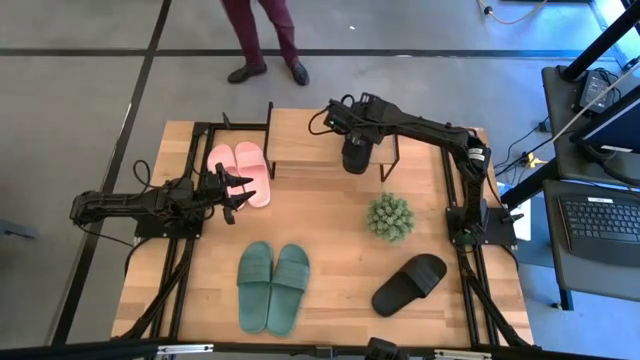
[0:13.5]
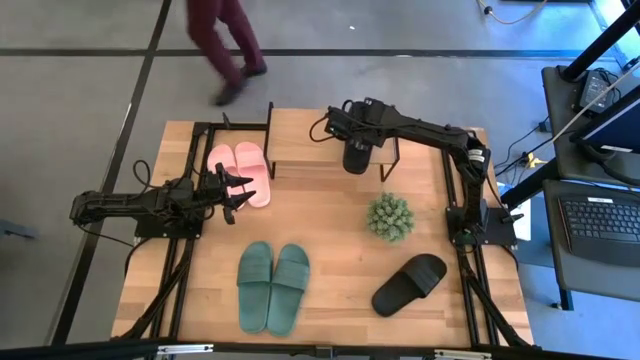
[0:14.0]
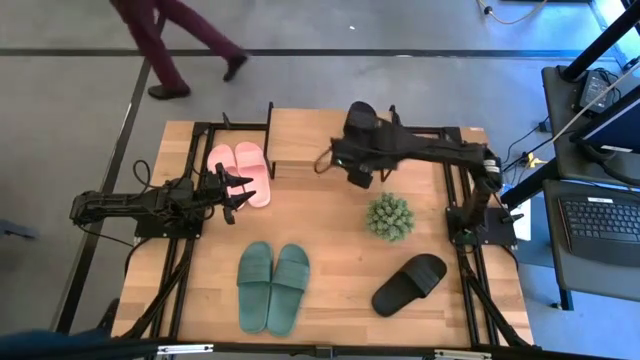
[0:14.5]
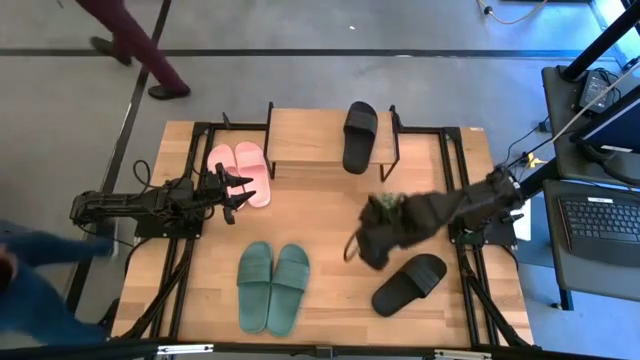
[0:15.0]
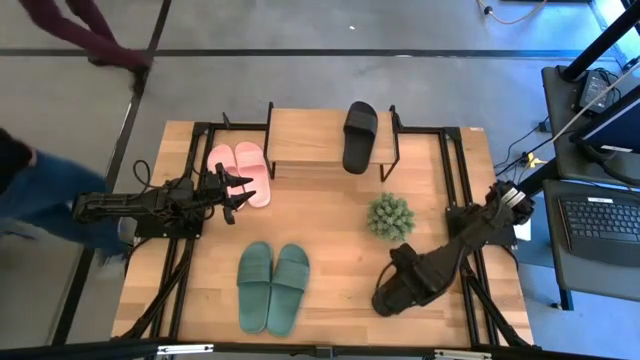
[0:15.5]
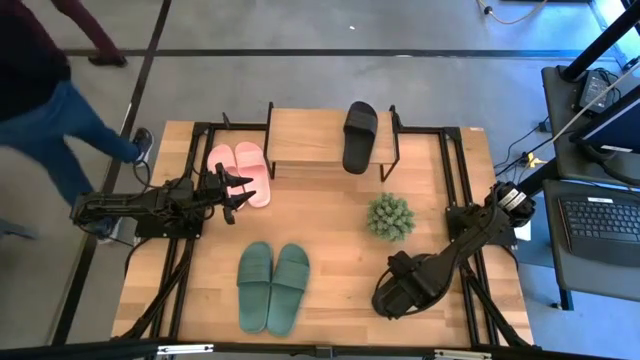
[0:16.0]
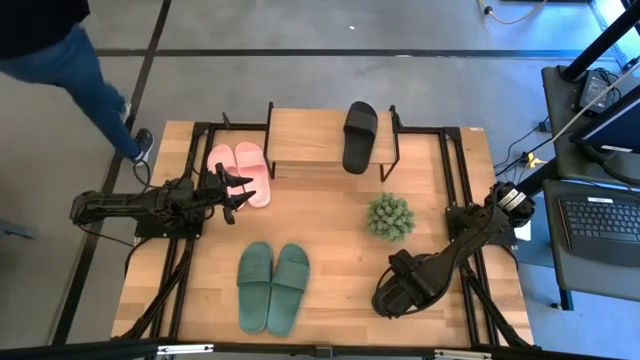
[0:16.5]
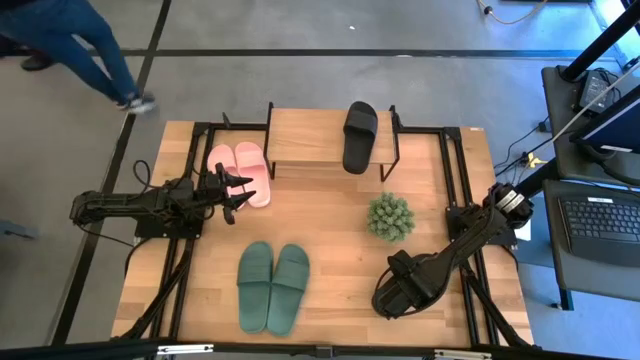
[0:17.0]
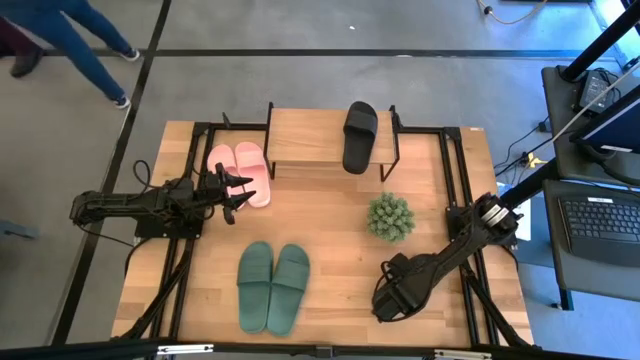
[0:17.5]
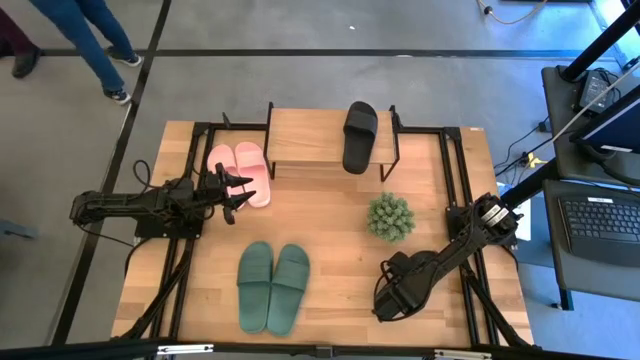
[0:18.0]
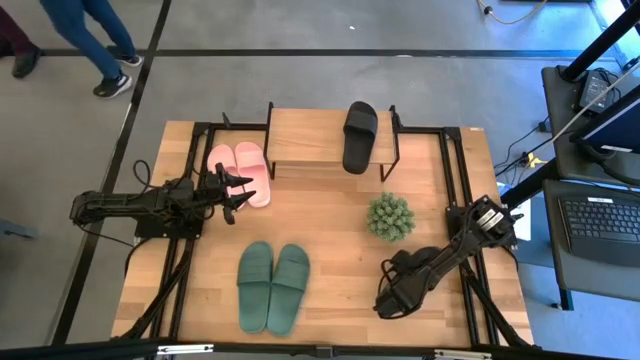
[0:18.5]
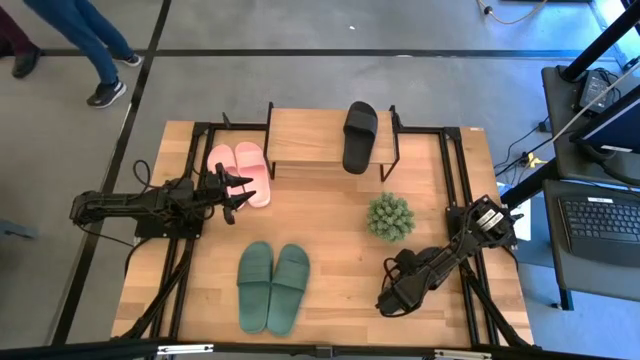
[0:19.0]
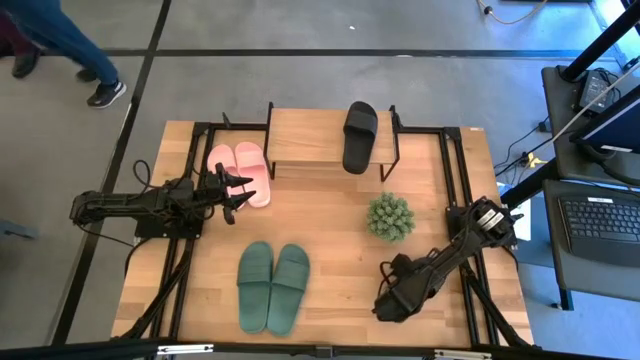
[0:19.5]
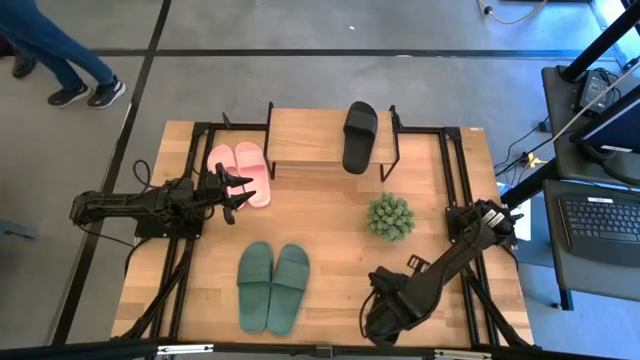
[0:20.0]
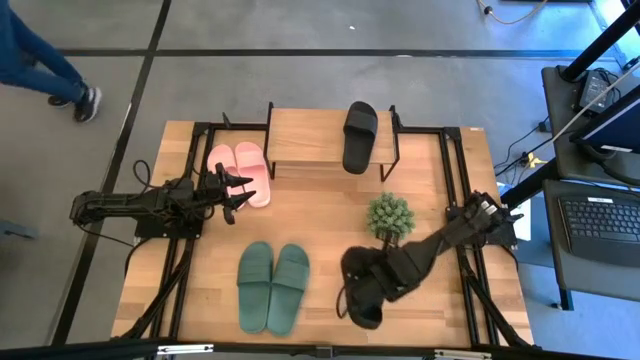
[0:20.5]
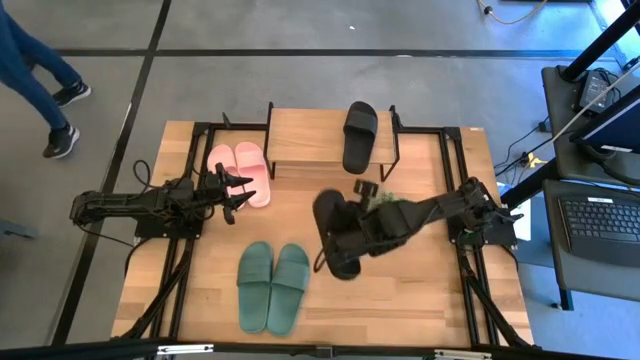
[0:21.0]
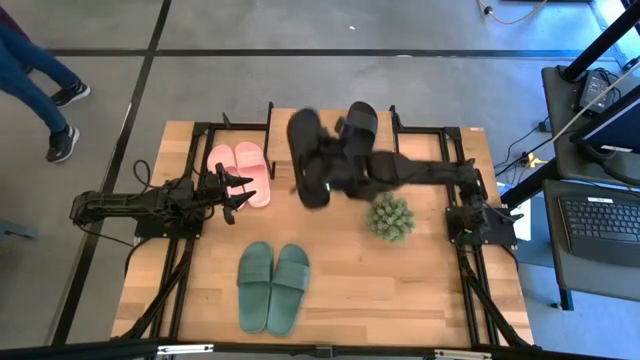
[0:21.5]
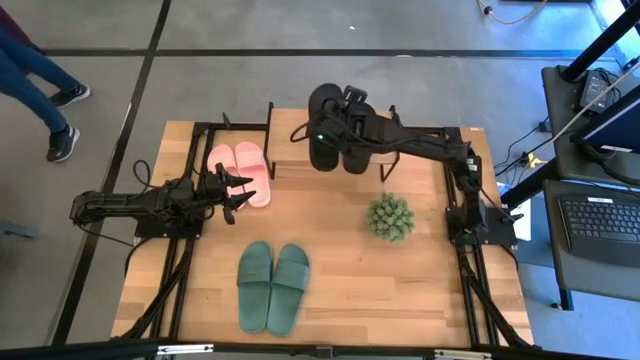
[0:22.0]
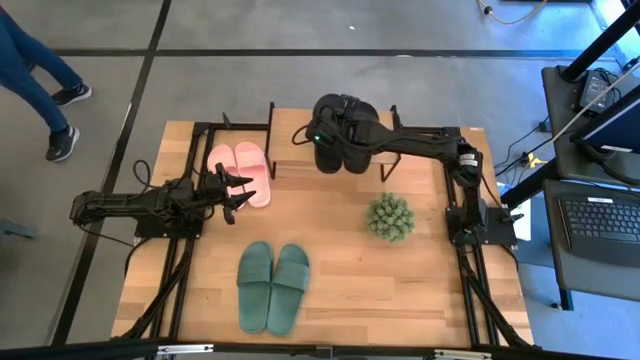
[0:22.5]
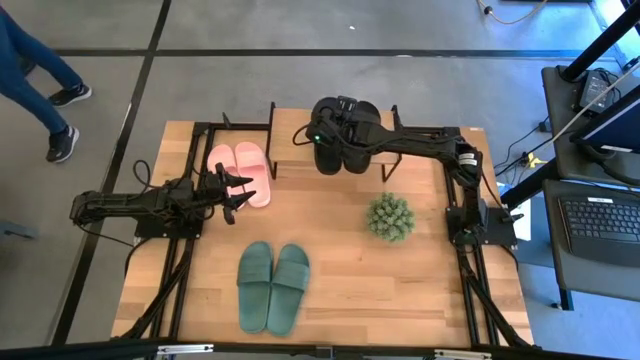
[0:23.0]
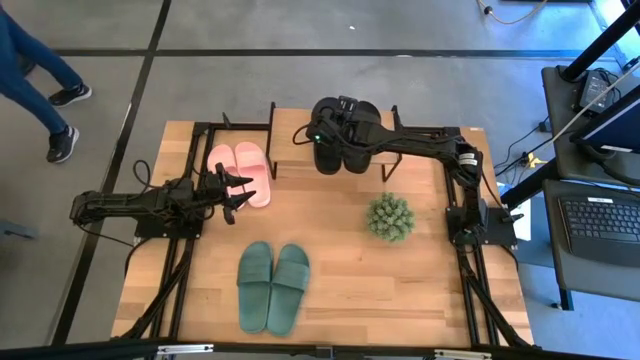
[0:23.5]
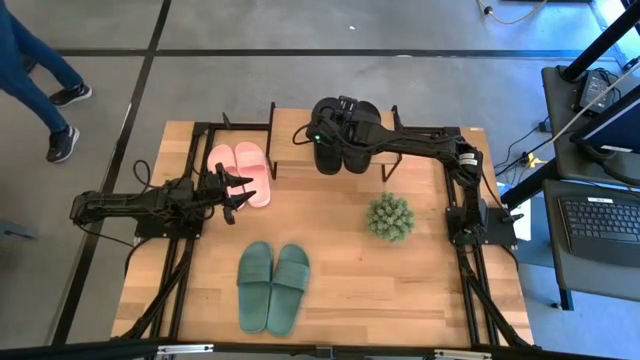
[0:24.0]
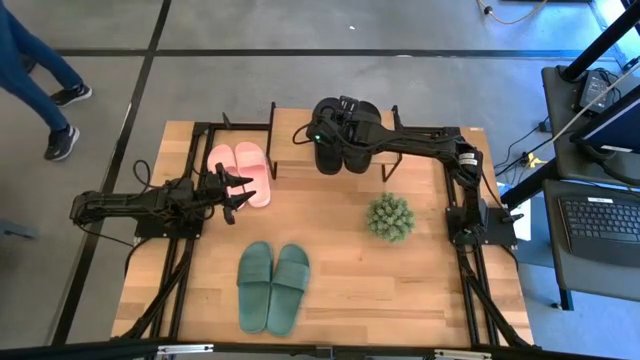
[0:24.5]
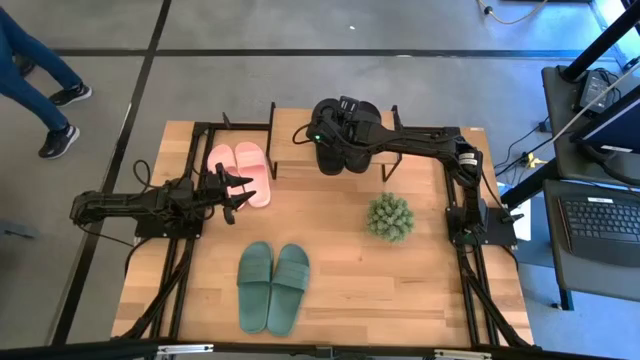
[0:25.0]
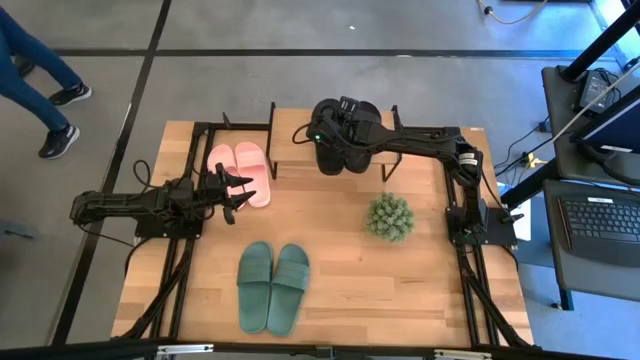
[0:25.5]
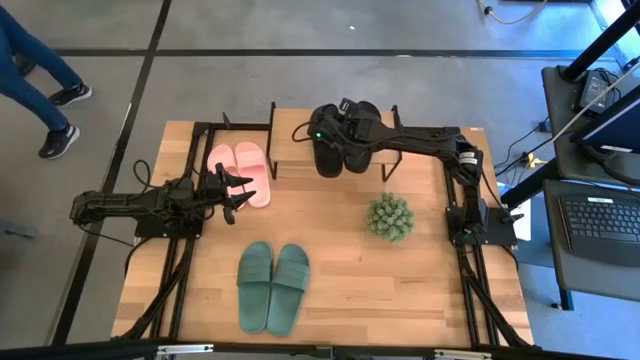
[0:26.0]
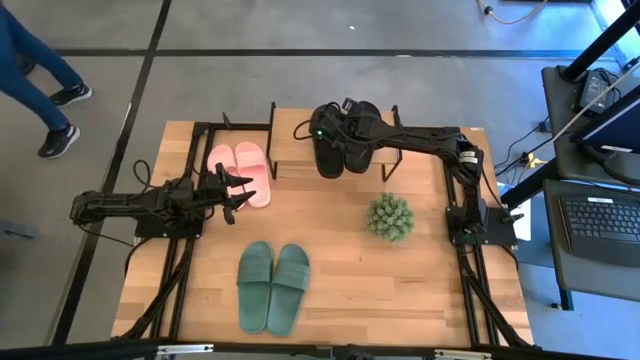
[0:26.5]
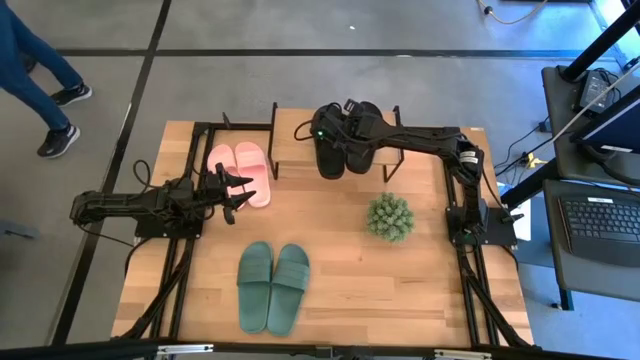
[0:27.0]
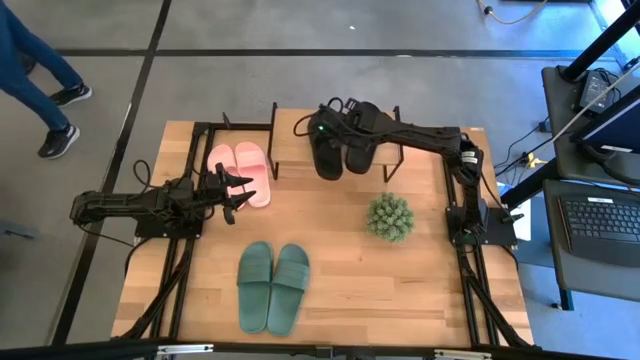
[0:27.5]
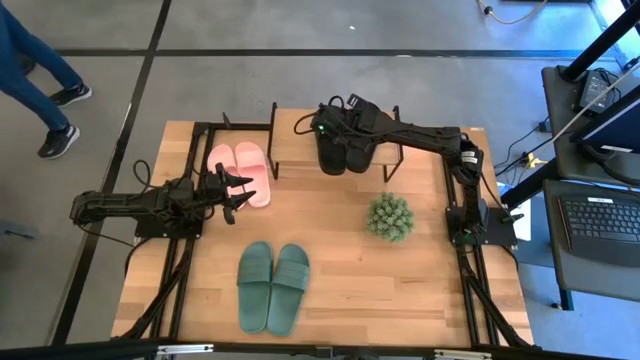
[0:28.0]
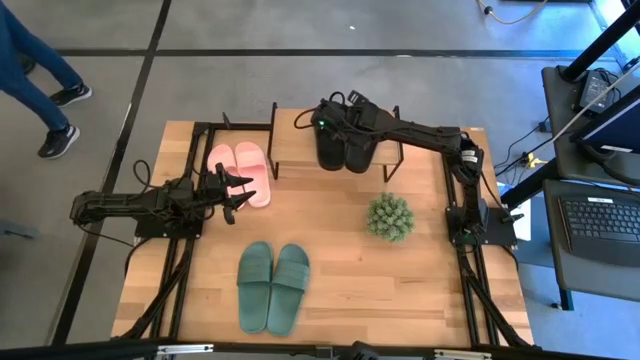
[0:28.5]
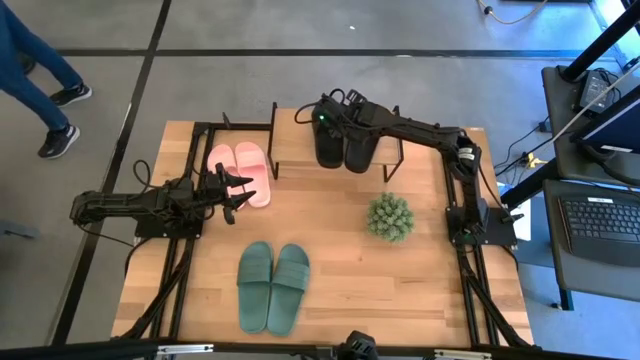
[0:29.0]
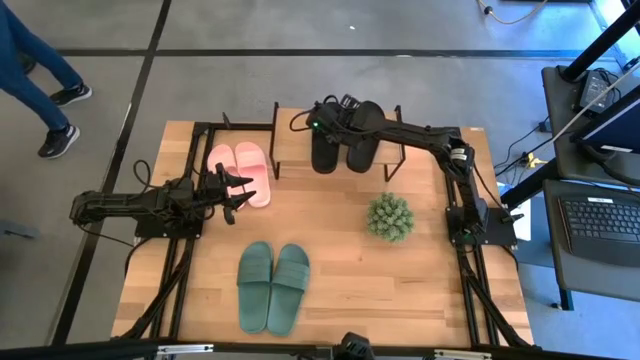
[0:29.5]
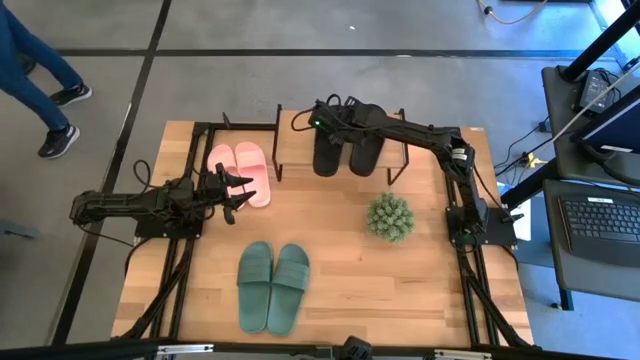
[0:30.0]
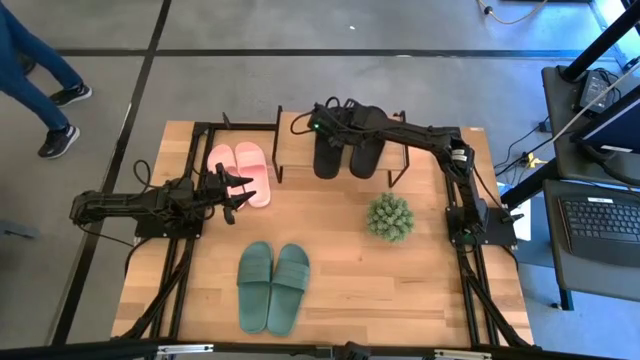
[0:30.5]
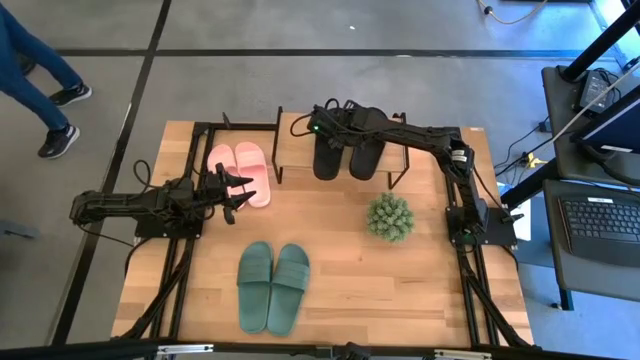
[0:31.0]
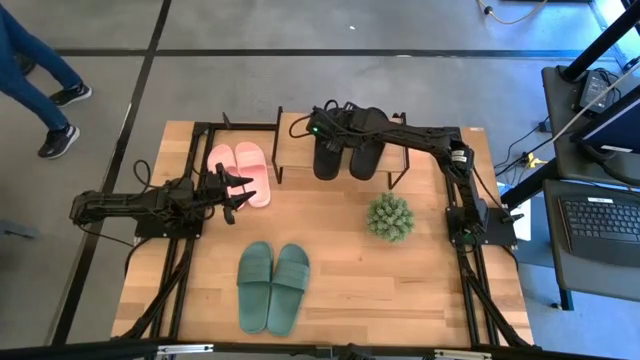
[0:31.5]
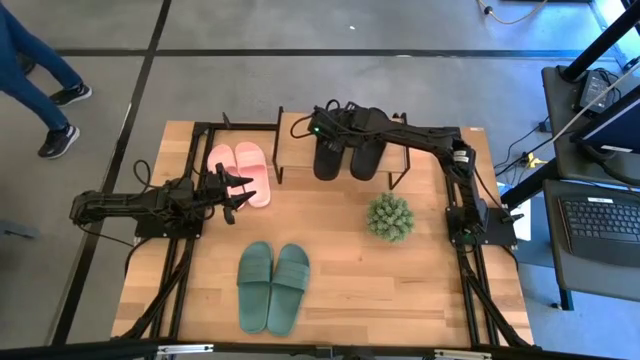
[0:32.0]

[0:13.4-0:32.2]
Task: Pick and place slides into the shelf
Put the black slide on the shelf
